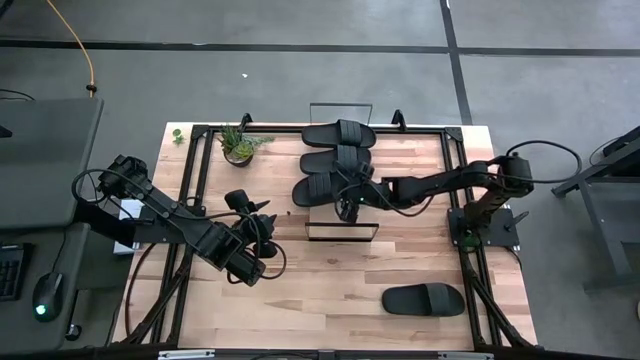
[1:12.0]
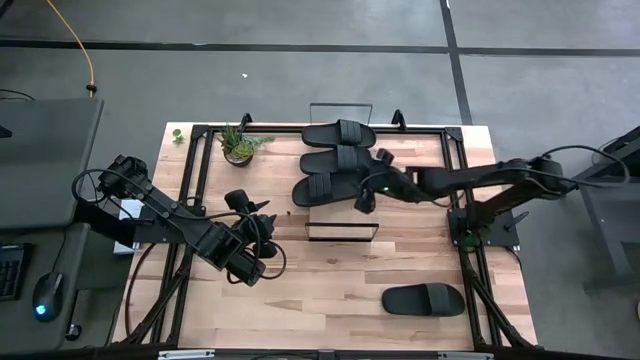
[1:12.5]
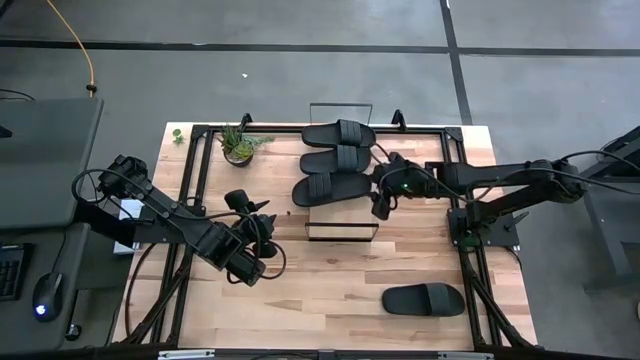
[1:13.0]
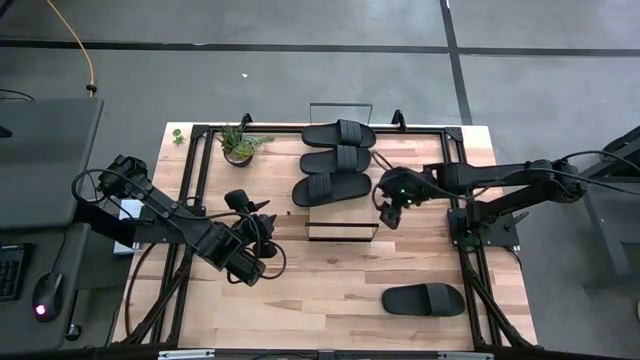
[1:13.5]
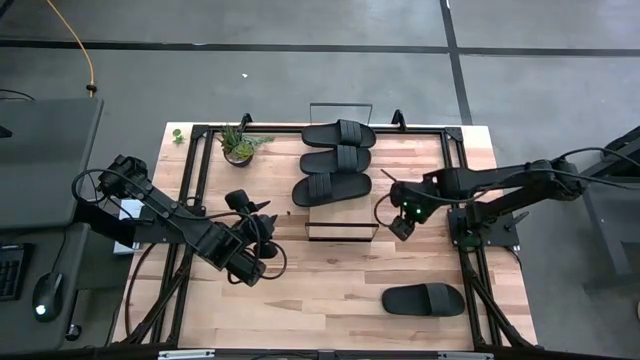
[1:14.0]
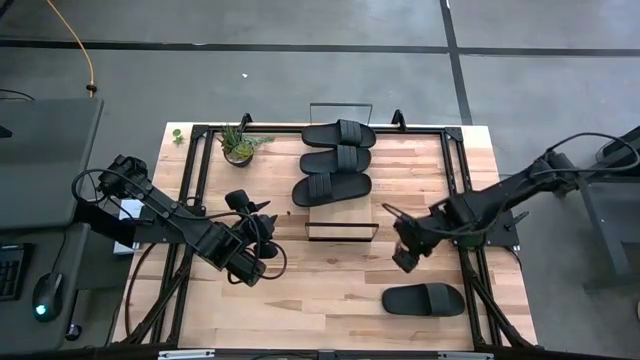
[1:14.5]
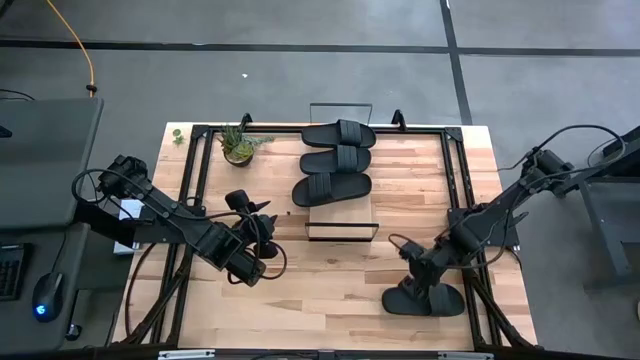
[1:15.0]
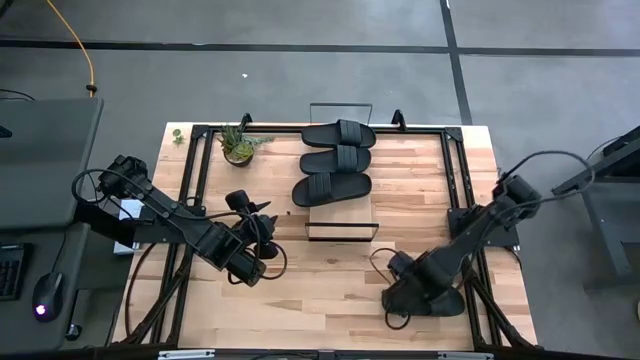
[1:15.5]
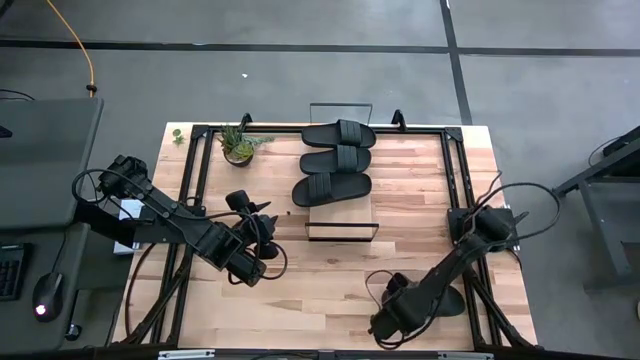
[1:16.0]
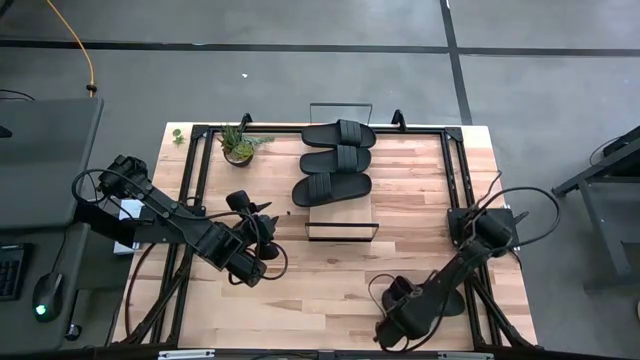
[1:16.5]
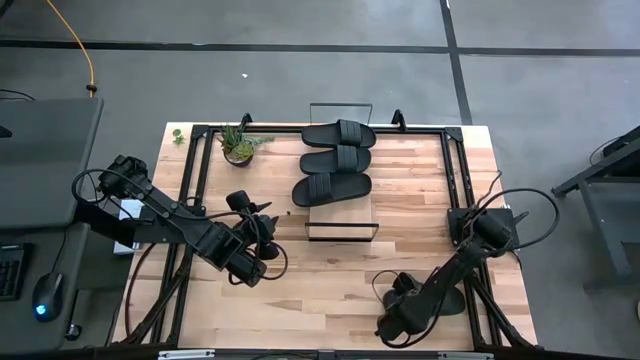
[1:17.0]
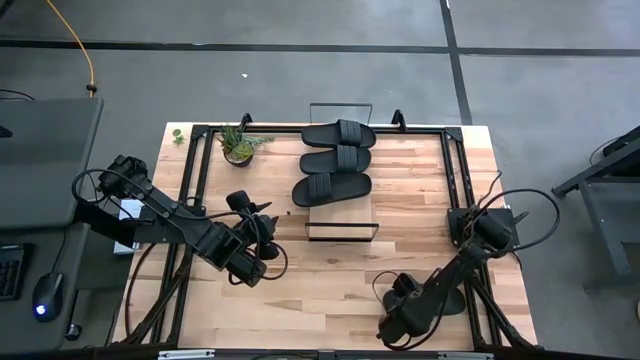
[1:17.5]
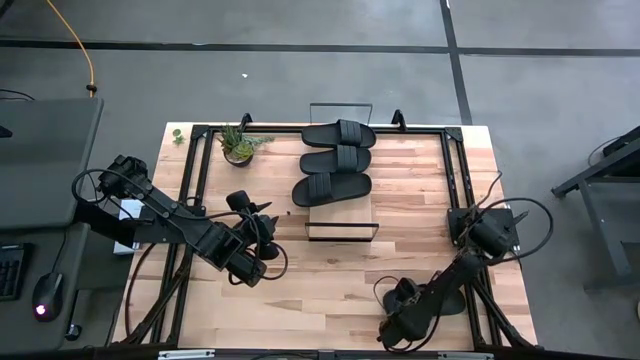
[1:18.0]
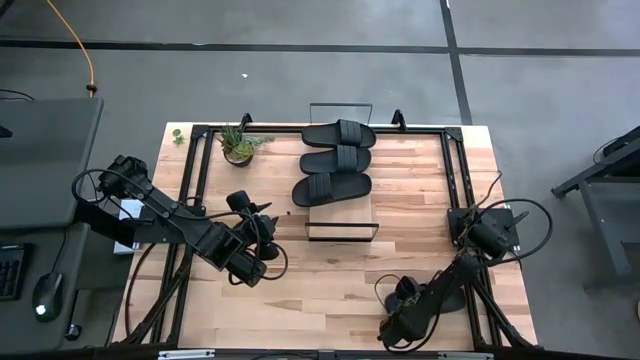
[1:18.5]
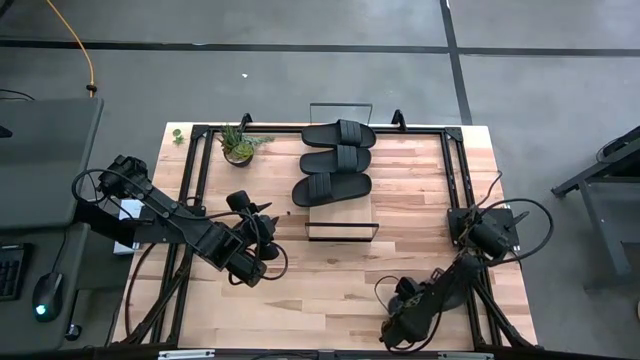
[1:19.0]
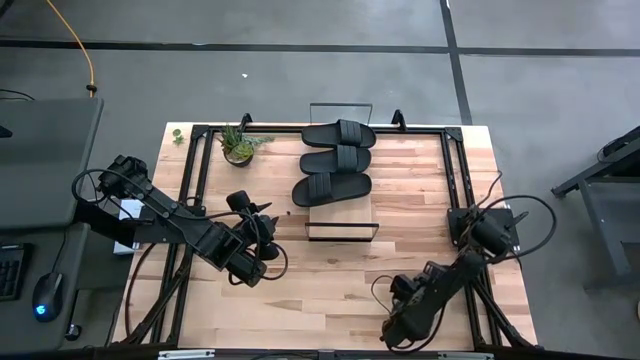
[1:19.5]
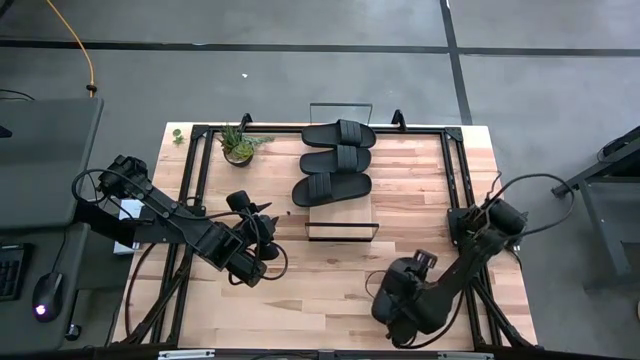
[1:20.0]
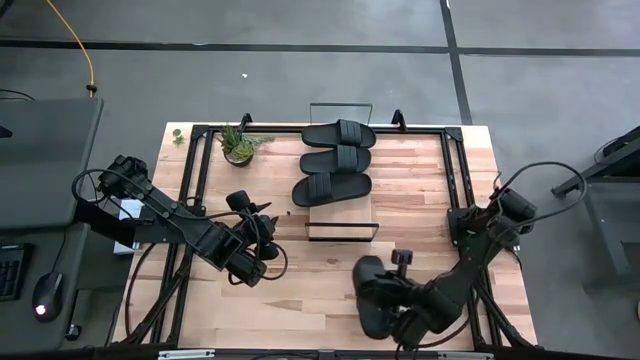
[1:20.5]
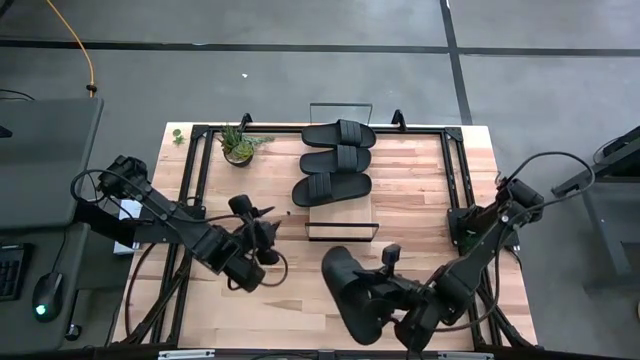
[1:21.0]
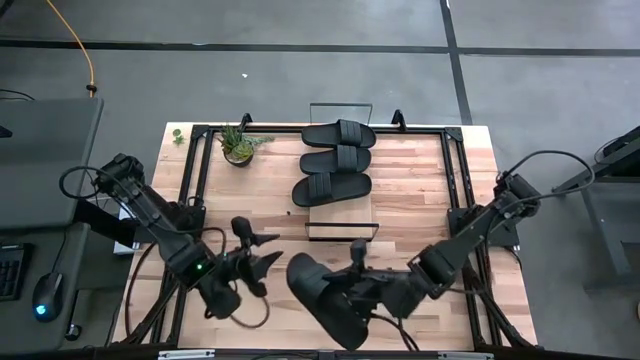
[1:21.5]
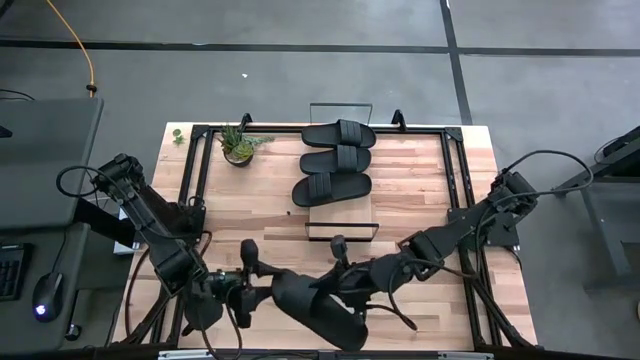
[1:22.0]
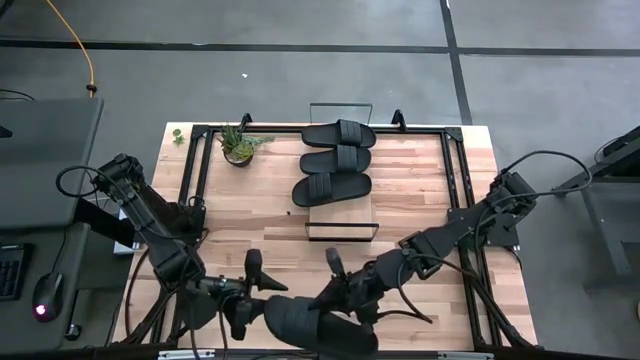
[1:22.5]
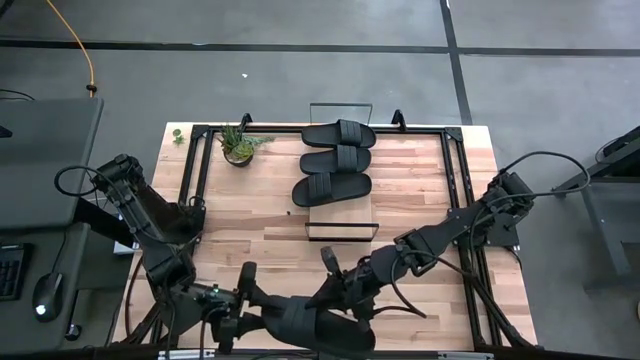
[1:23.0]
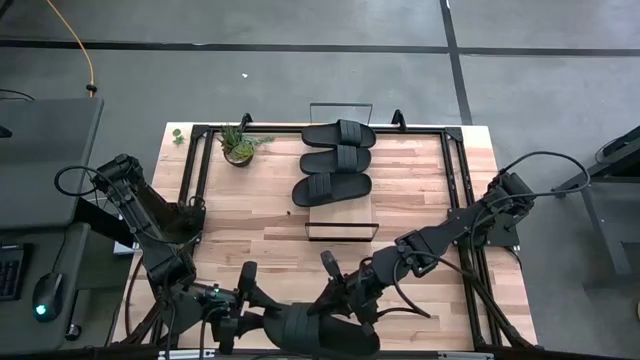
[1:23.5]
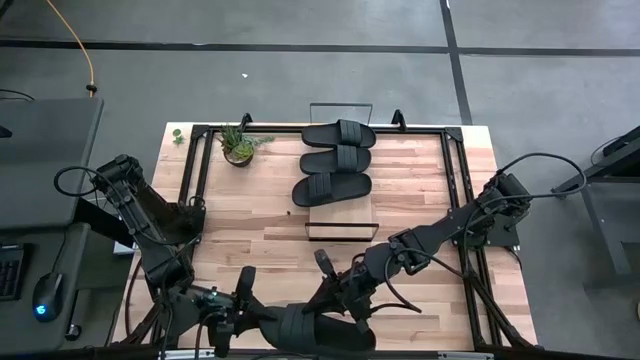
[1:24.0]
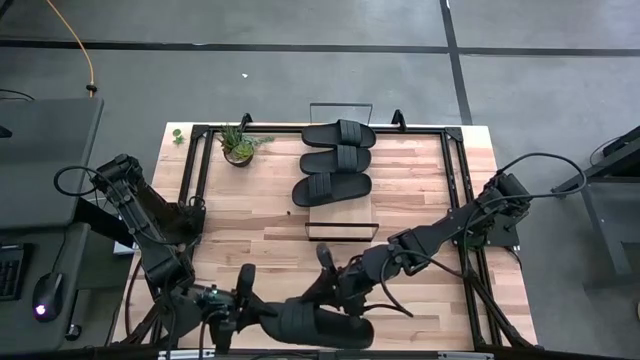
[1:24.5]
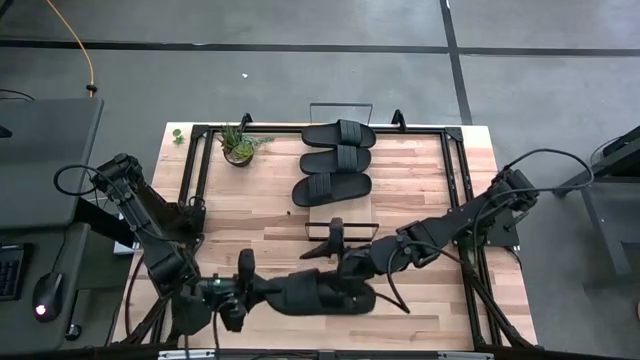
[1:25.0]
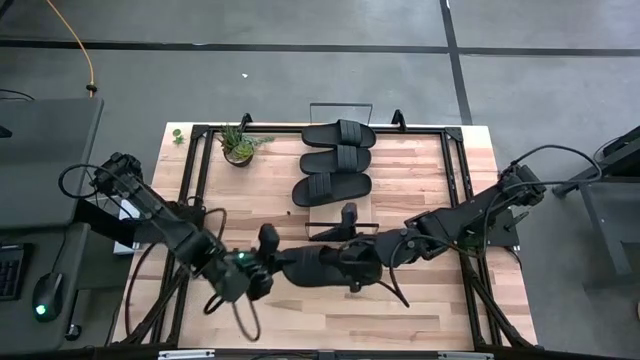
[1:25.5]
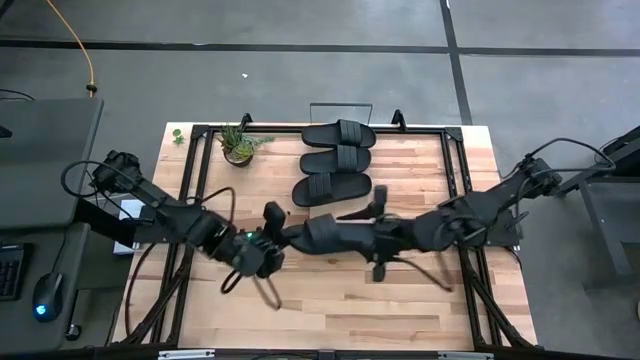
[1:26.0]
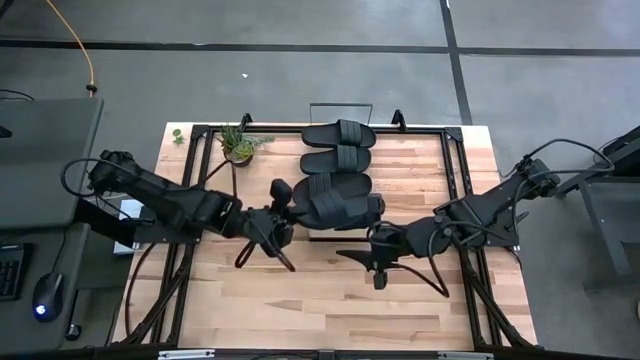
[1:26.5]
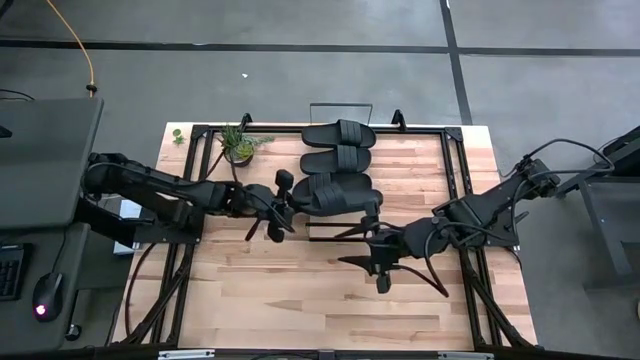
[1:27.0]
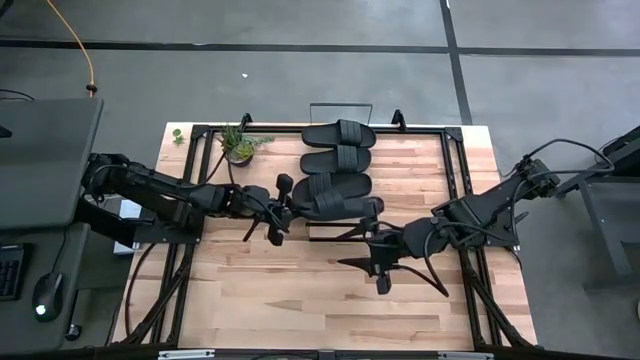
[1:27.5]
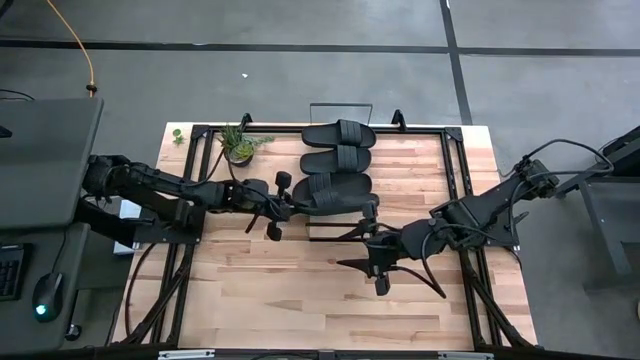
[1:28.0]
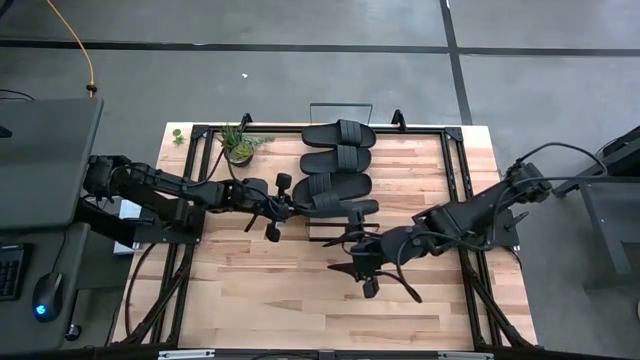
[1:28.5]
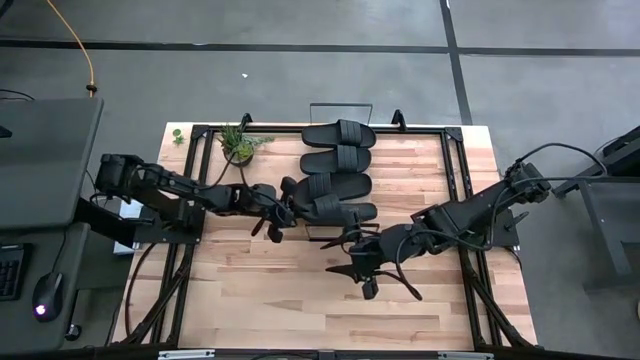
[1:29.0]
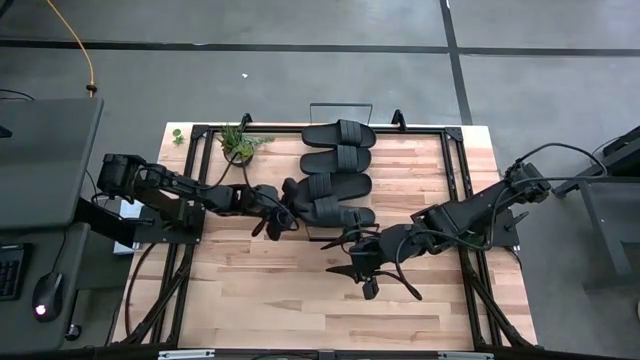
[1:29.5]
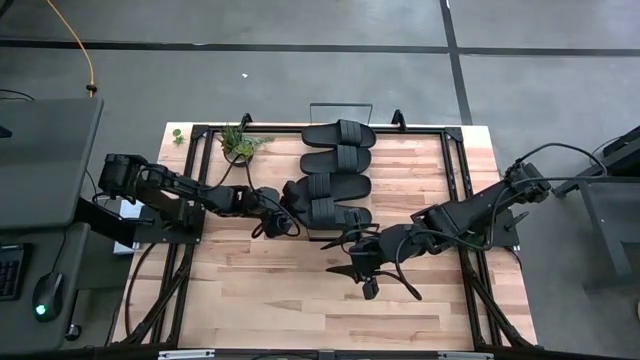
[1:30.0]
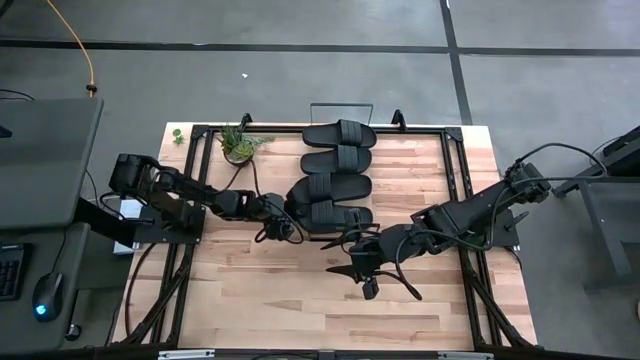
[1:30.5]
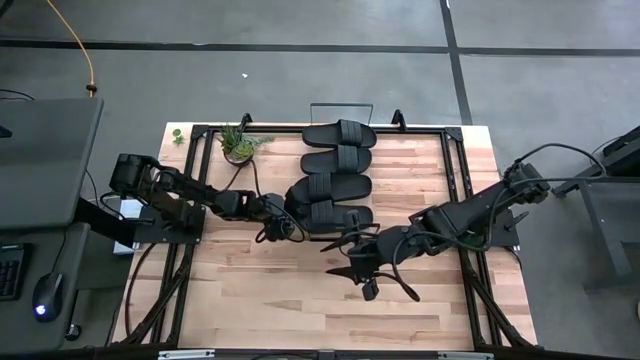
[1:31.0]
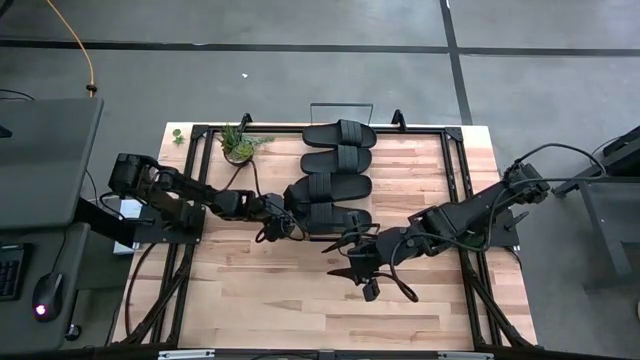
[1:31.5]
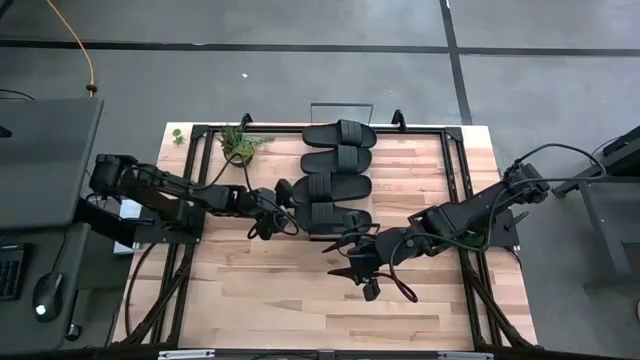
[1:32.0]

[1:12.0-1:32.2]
Task: Pick and place slides into the shelf
Put the black slide on the shelf
